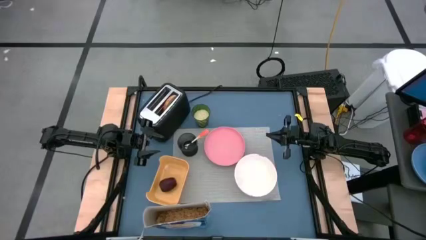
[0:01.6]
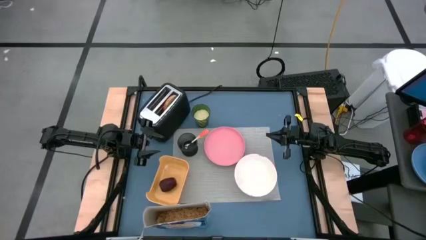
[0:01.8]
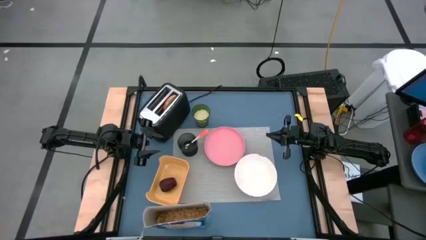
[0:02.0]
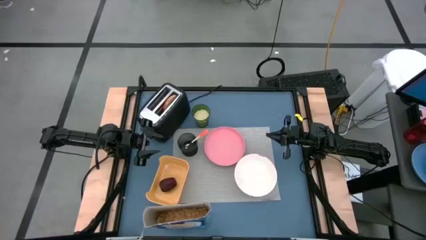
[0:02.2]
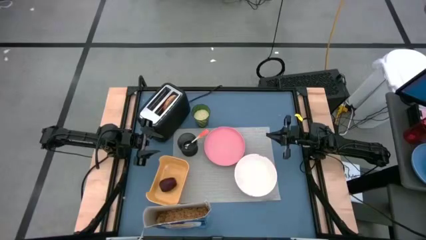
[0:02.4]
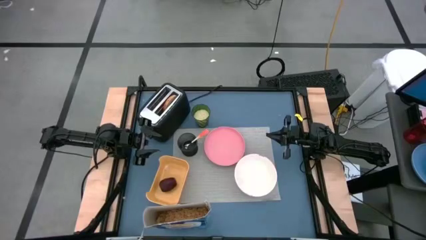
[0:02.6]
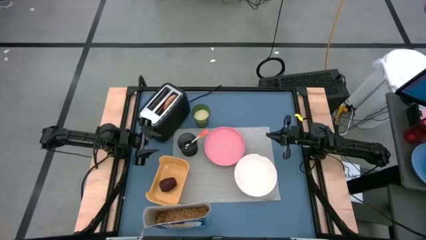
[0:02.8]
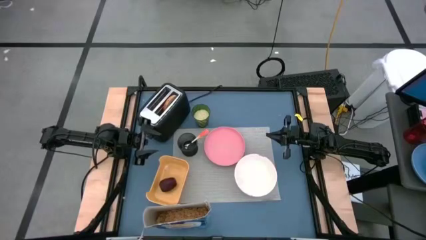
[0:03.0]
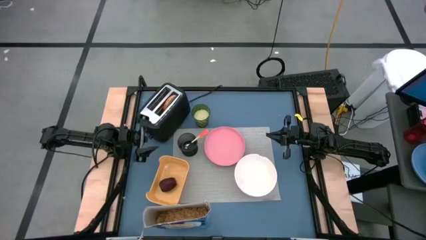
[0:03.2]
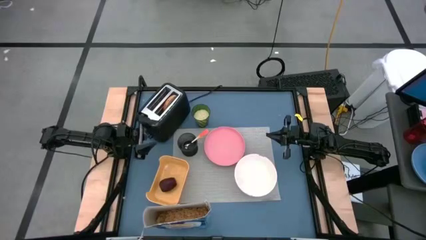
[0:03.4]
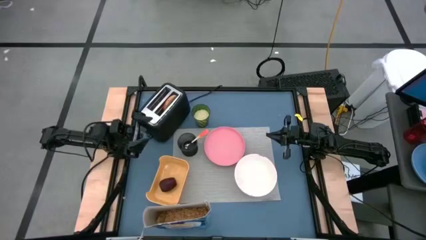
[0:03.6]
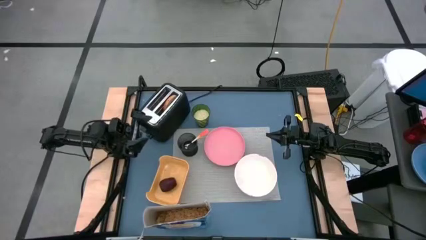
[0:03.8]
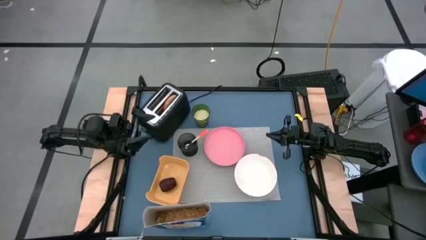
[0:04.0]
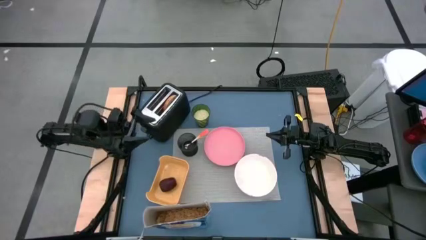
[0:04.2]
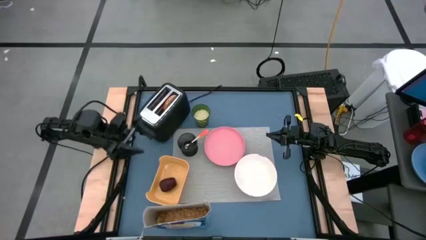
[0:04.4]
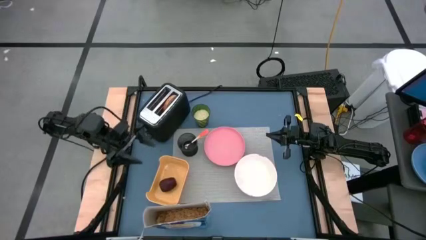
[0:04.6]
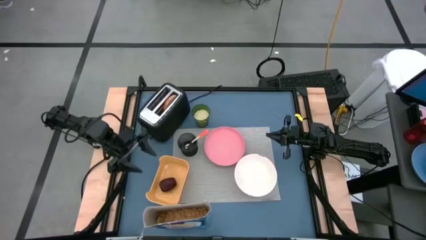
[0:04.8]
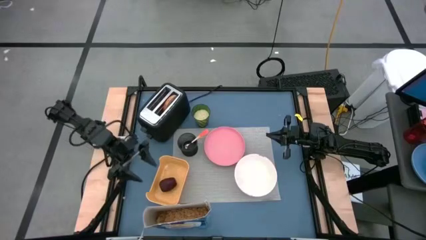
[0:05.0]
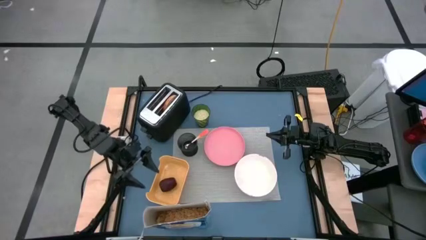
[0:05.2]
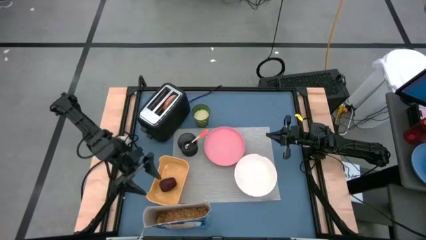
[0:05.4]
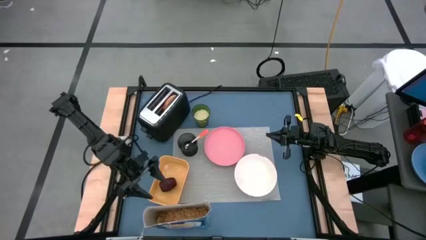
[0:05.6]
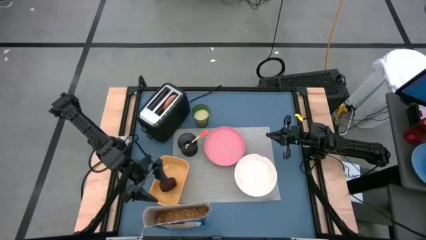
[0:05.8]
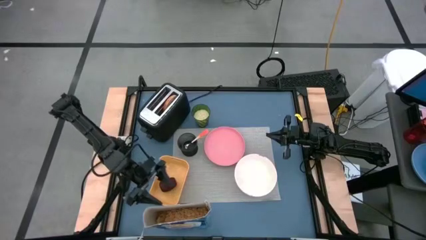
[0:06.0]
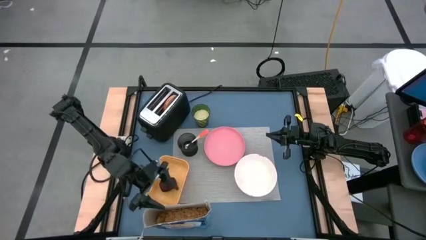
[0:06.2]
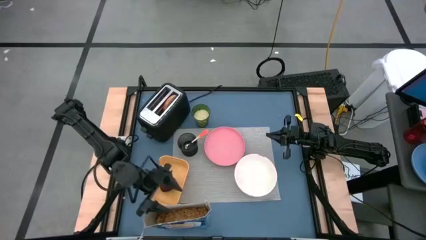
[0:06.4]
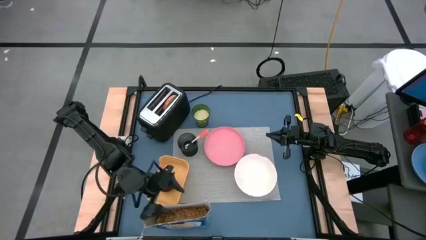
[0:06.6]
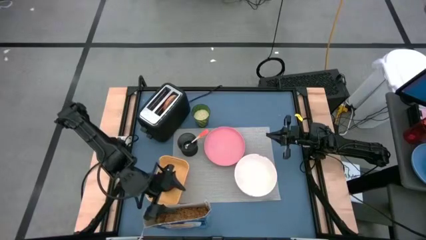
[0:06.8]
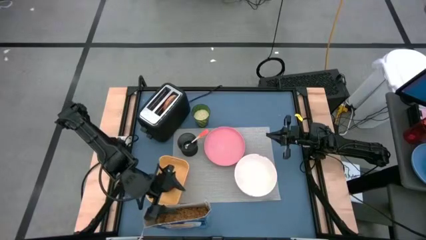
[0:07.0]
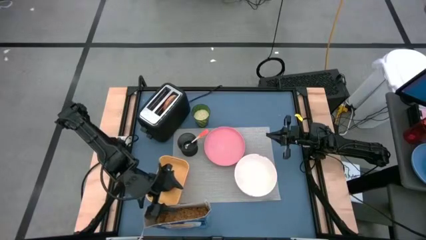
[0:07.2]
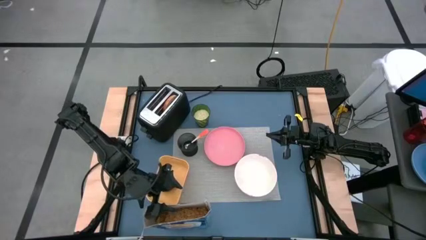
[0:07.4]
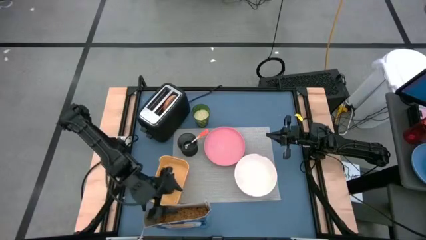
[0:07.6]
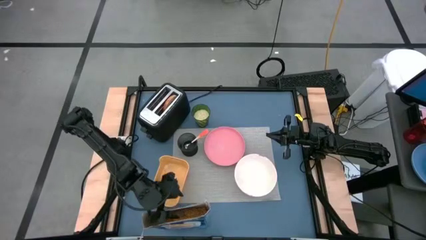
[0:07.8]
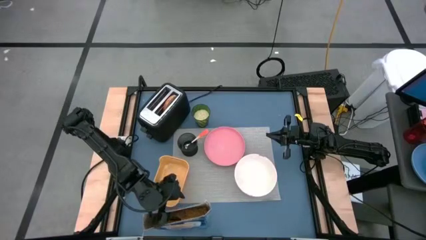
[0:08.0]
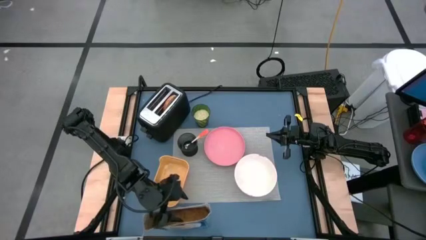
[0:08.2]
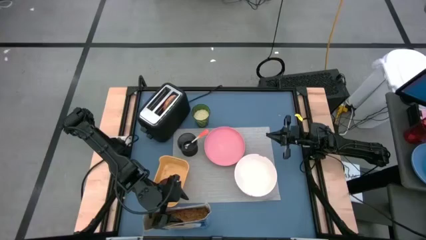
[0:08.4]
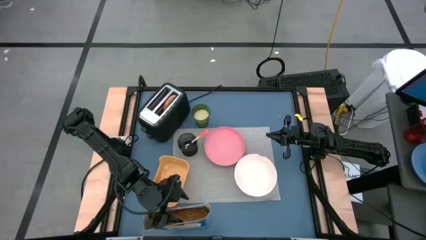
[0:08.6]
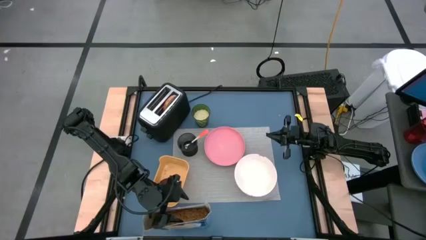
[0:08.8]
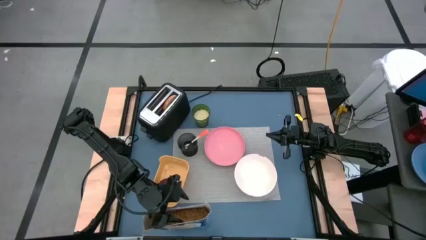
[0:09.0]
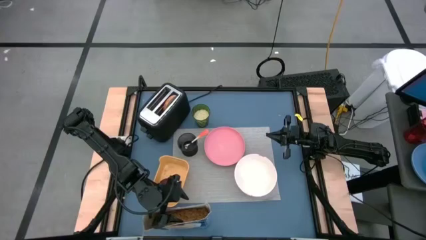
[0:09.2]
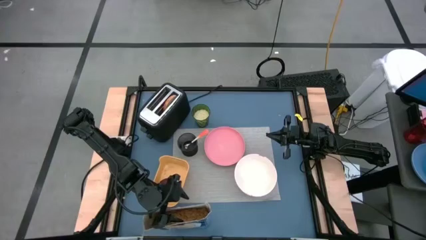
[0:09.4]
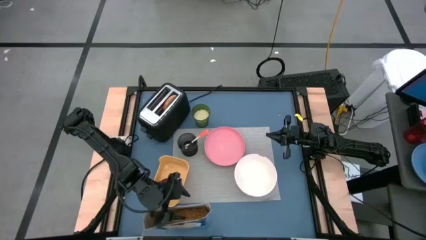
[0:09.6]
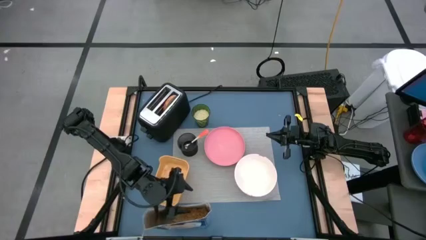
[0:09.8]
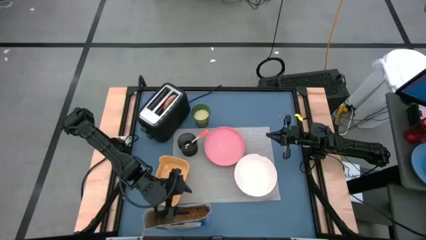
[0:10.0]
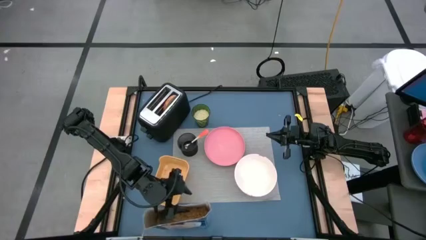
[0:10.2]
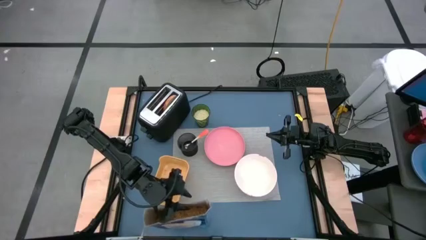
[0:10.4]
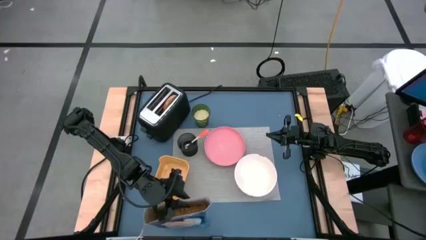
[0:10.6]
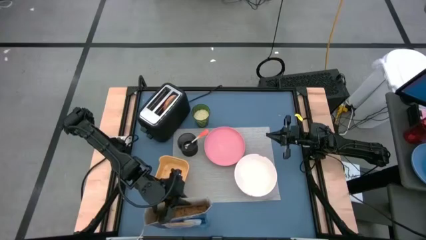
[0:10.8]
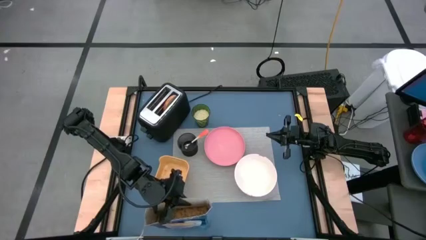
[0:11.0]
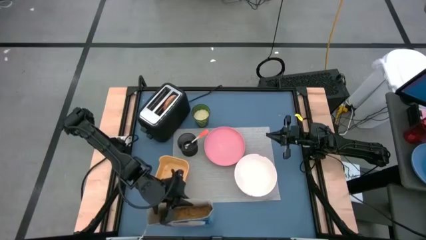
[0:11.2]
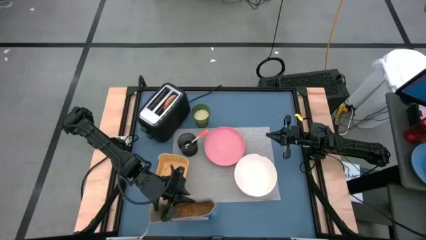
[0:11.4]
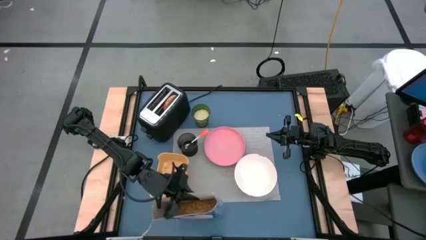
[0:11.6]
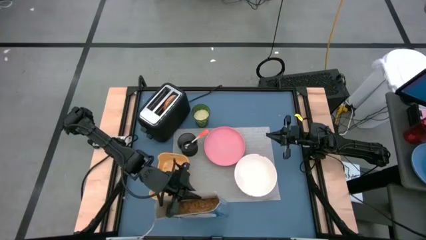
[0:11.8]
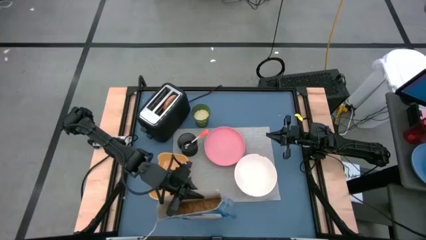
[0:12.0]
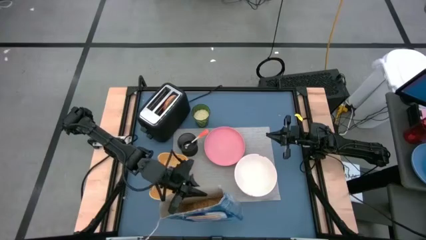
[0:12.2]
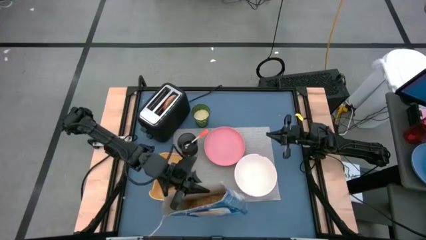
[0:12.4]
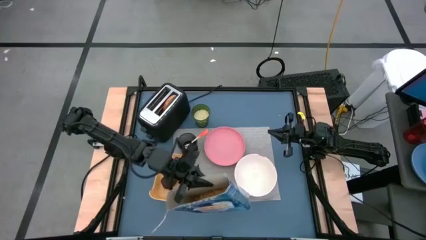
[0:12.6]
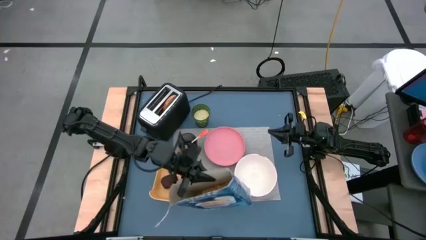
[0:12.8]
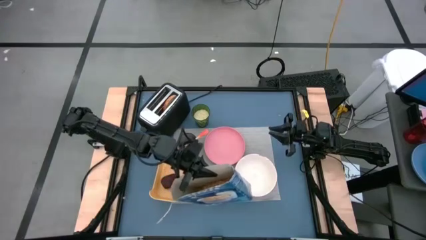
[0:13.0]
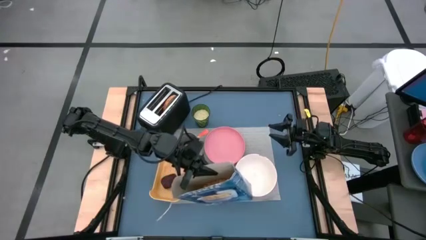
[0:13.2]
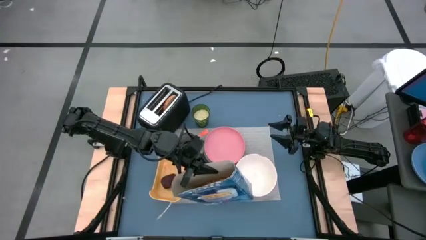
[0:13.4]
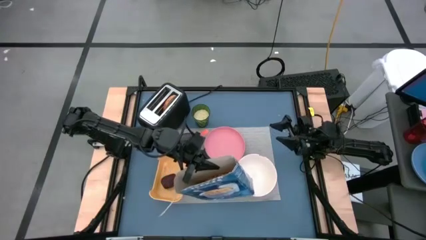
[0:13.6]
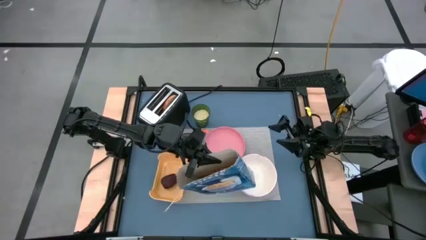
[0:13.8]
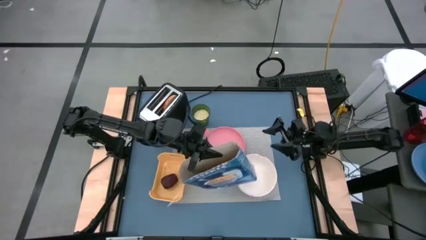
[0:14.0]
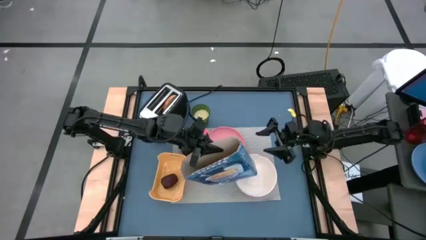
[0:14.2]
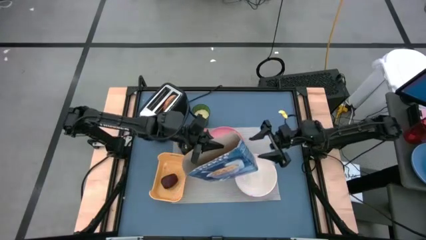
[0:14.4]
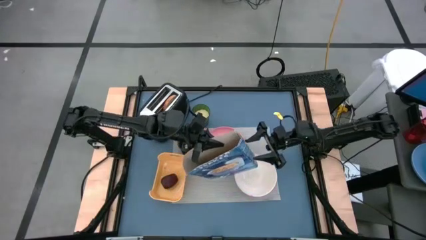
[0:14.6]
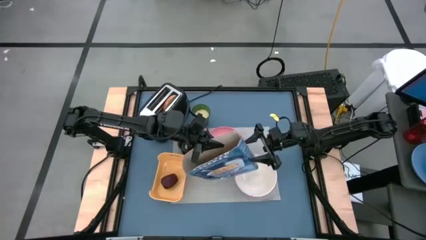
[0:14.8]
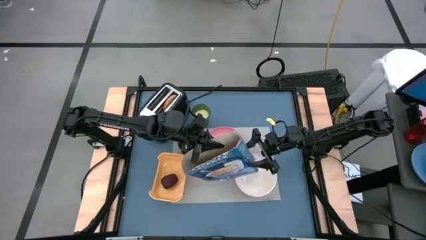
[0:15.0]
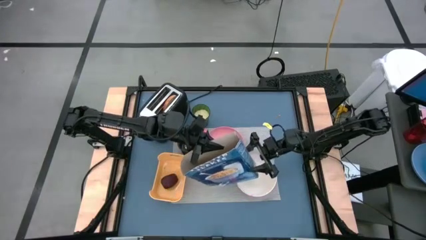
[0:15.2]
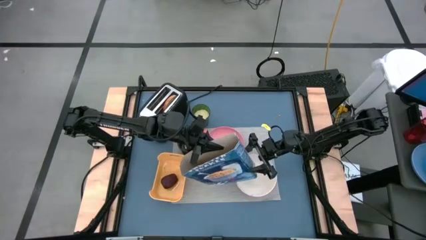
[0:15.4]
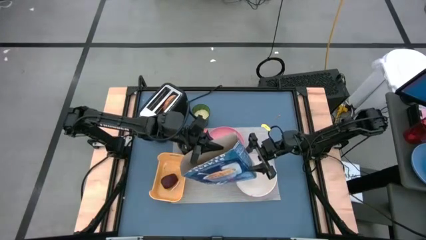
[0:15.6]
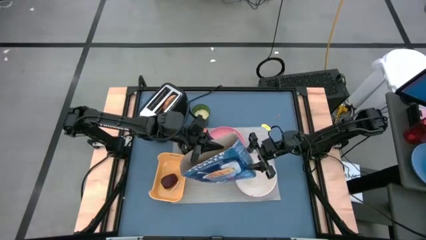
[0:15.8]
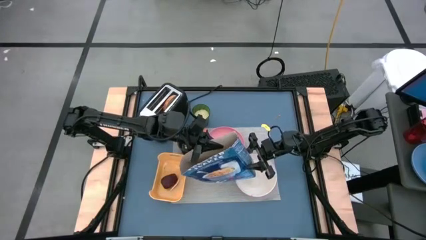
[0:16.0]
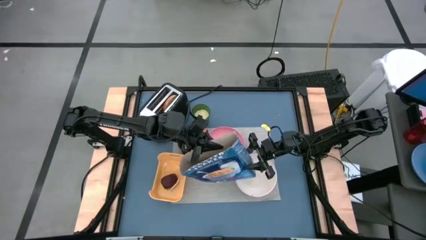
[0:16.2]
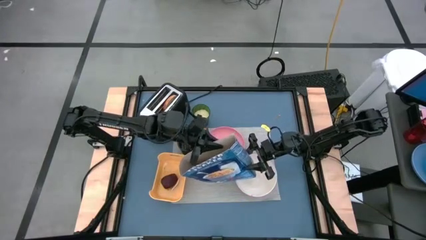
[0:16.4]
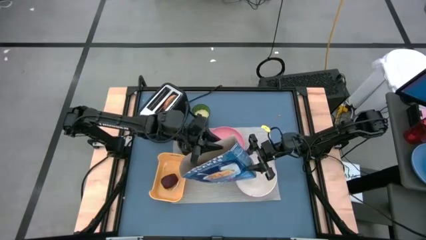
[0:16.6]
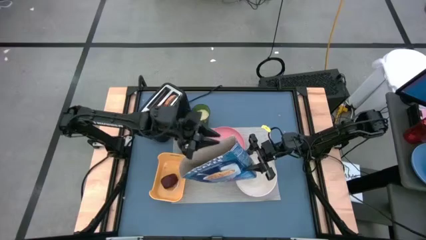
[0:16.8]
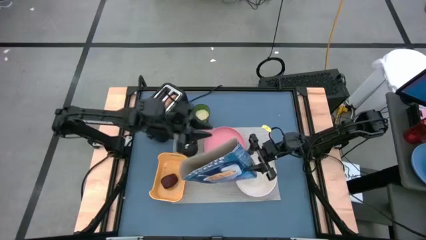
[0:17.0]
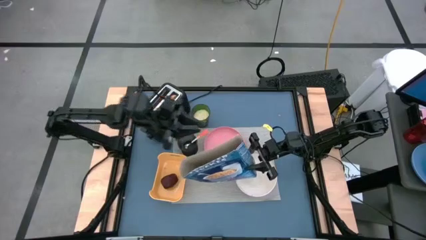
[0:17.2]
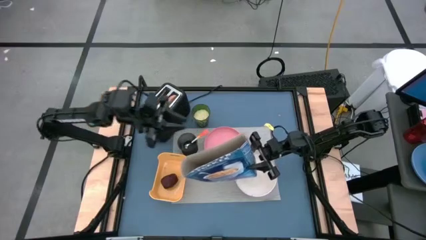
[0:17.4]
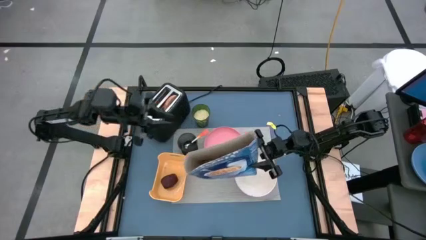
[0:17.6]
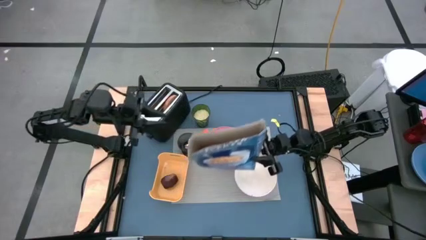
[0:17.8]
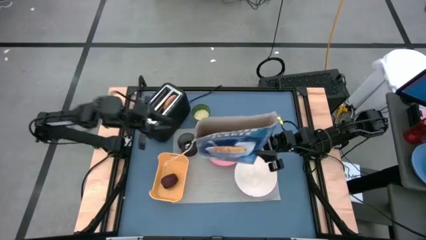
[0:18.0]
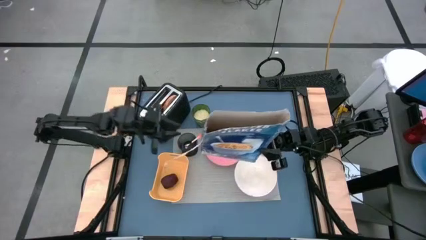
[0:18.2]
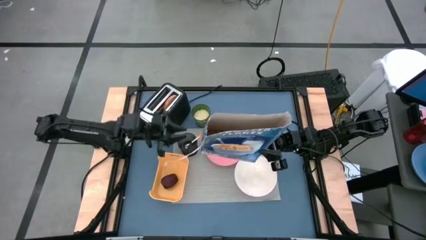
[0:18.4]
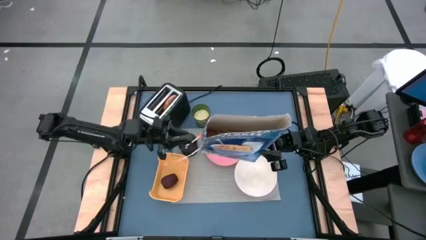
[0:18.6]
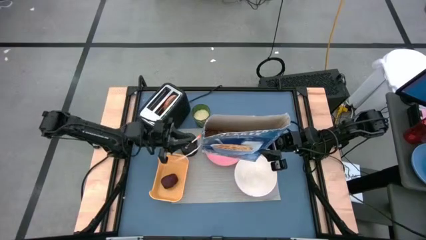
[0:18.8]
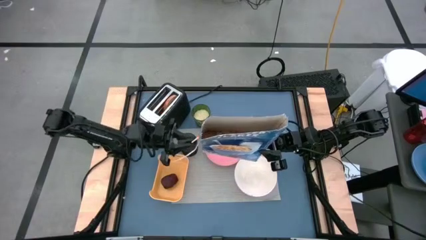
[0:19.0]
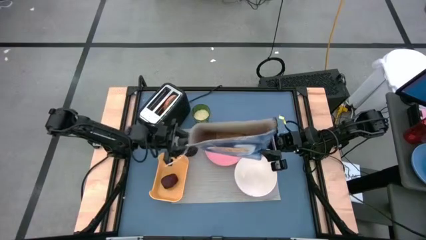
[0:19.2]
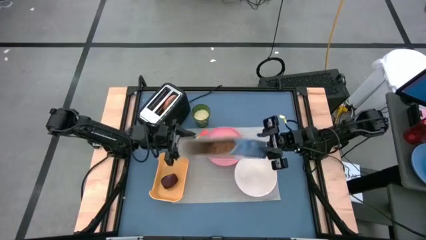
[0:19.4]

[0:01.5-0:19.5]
Task: Arrange a breakfast setting
Pour the cereal in the bowl
